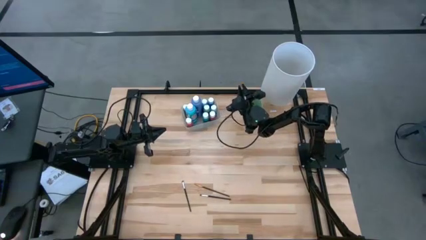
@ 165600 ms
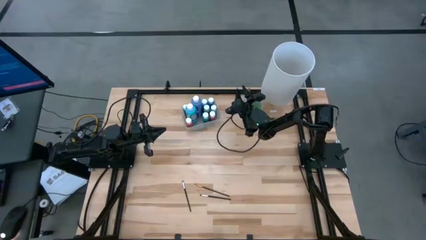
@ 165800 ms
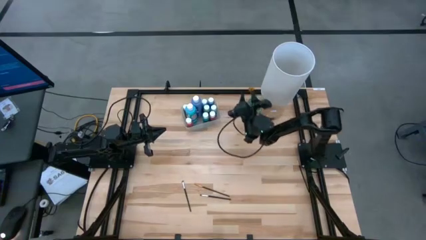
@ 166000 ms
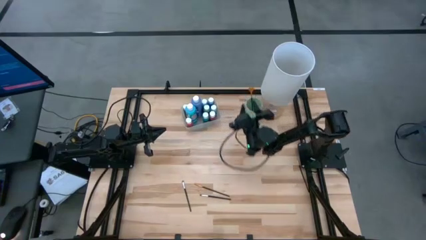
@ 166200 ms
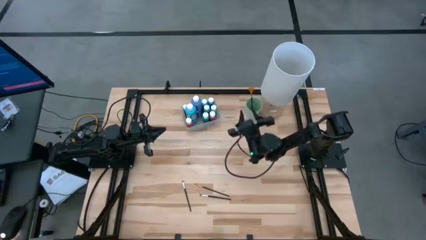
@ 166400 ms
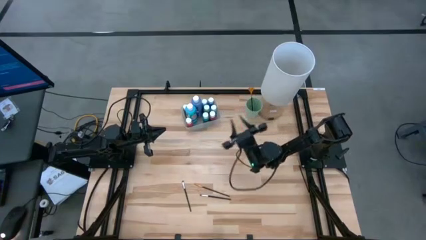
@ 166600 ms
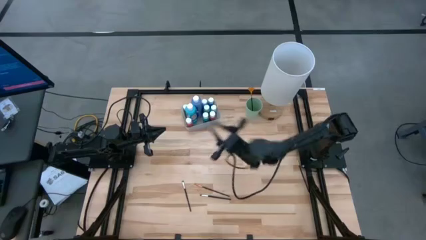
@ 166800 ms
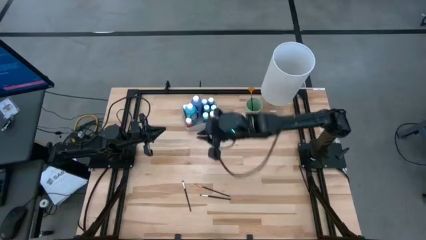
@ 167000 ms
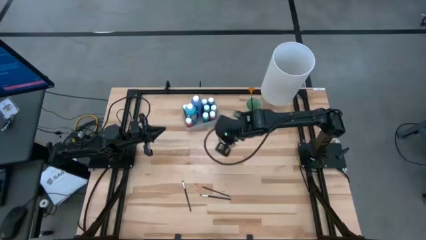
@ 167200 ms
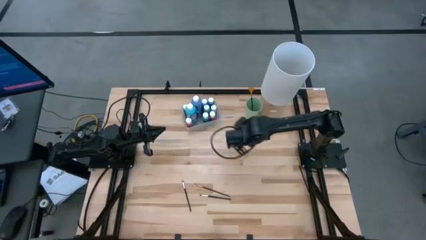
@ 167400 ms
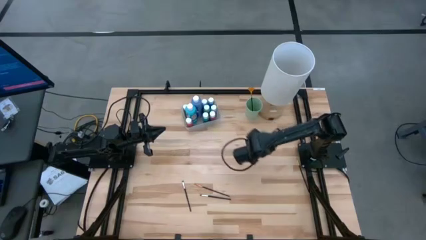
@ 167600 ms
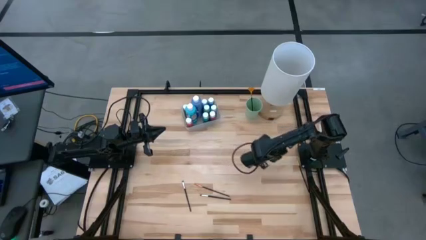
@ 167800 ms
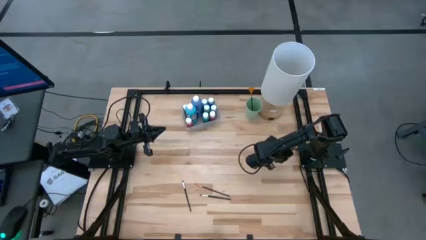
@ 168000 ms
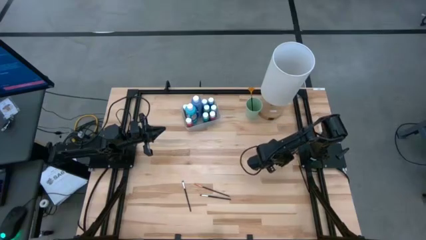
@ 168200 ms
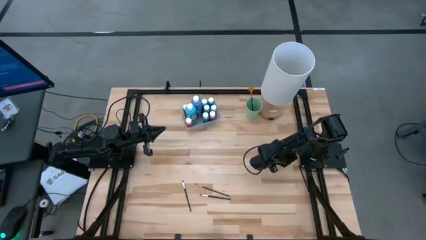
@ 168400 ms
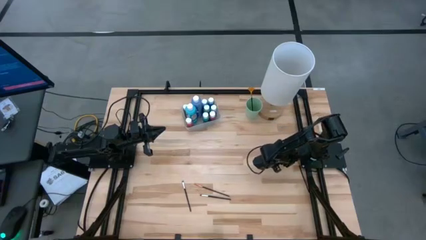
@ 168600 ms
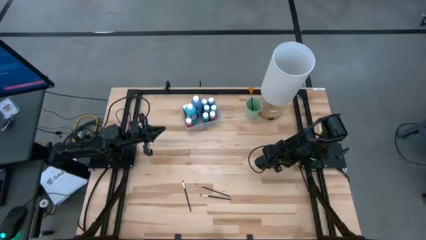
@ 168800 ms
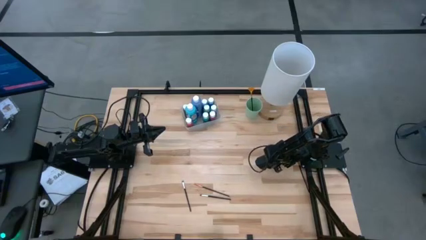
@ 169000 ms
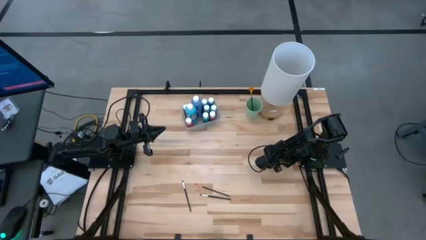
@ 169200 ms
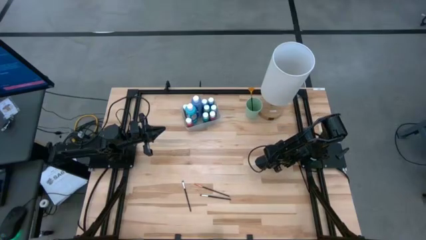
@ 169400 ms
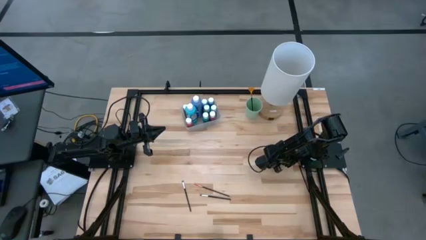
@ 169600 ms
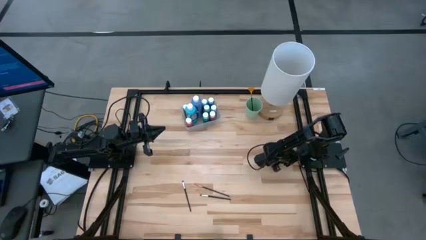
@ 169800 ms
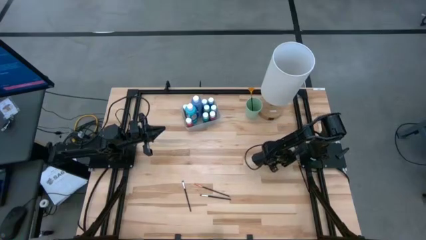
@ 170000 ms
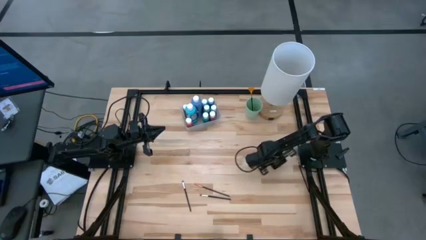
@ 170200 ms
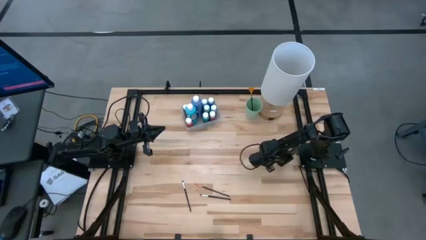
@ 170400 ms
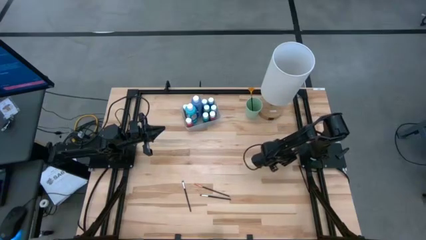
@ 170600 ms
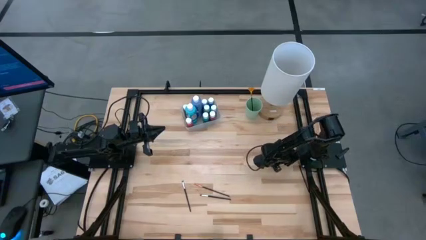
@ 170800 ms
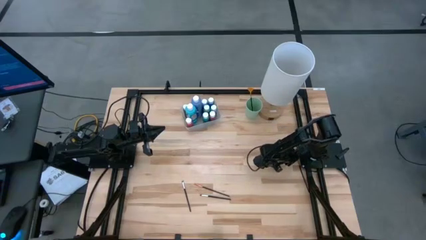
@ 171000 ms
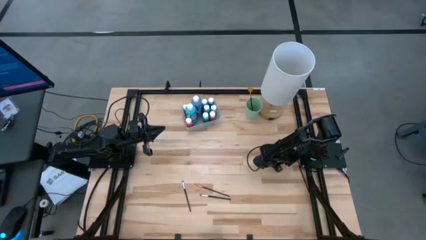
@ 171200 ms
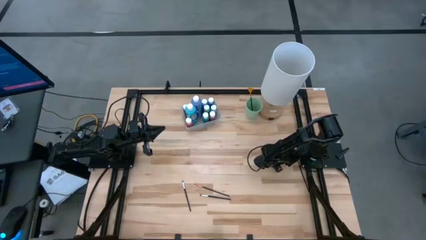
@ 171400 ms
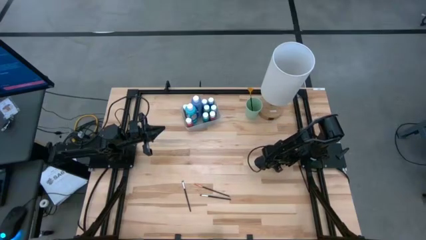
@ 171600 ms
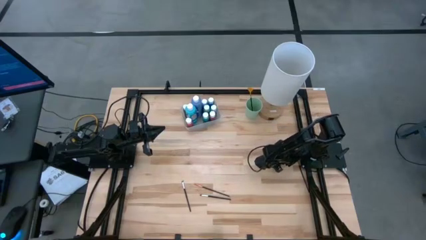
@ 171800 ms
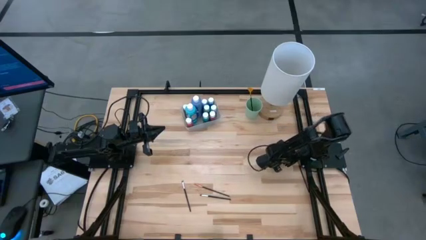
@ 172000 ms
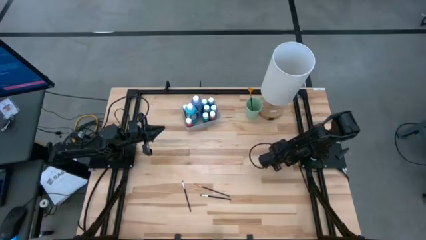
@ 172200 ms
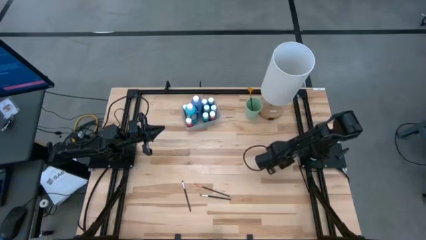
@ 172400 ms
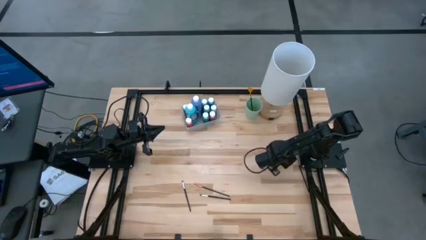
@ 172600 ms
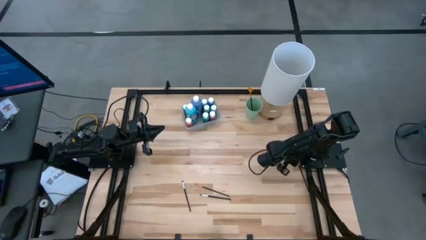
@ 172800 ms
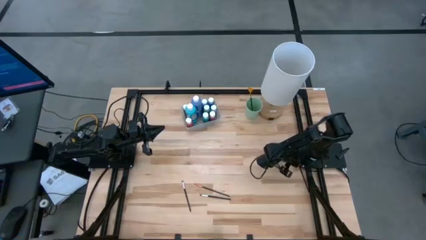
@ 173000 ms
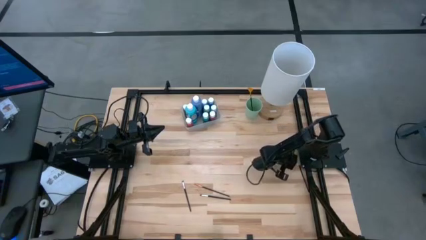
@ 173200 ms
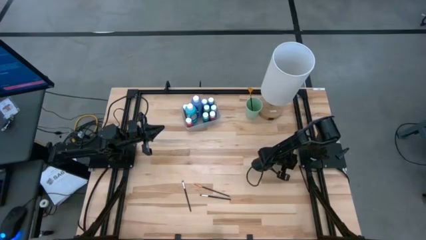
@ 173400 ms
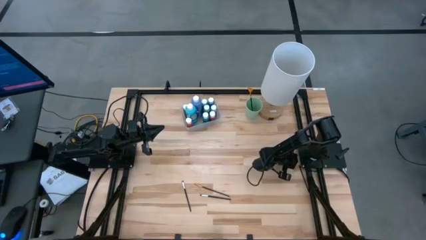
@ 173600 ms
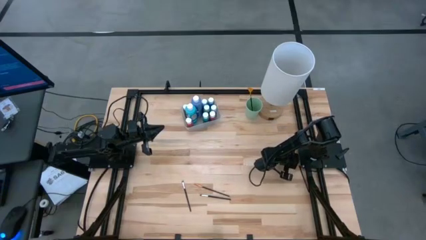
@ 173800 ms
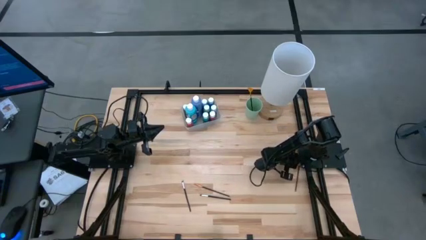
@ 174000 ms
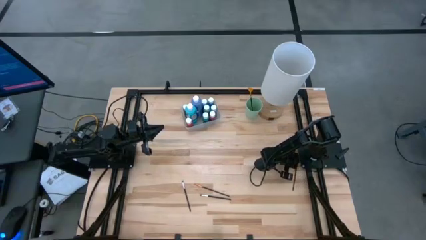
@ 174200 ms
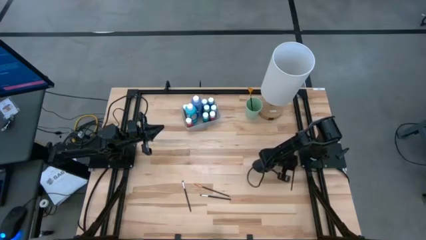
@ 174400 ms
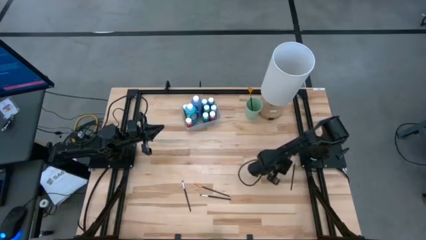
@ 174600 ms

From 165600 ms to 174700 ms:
Task: Pick & Place Paint Supplies
Put the gold paintbrush into the green cup

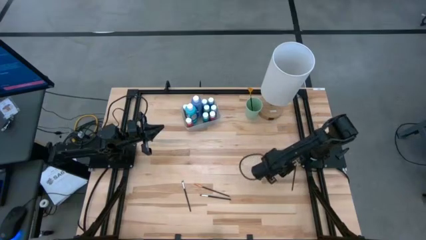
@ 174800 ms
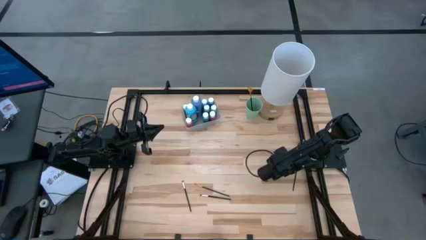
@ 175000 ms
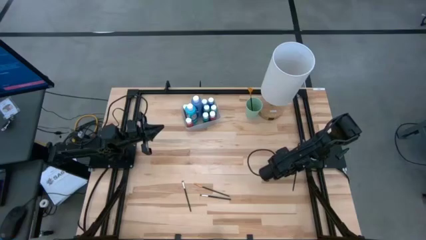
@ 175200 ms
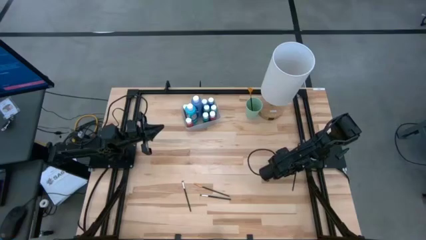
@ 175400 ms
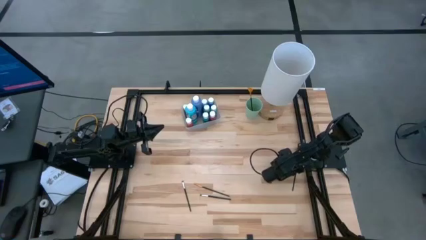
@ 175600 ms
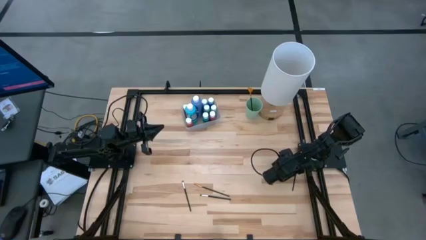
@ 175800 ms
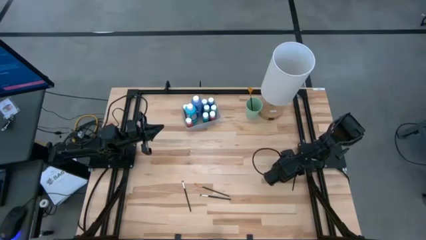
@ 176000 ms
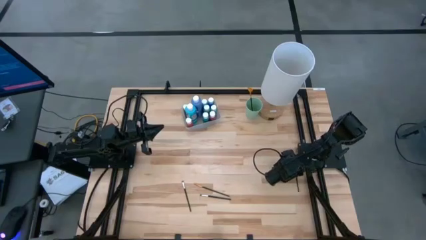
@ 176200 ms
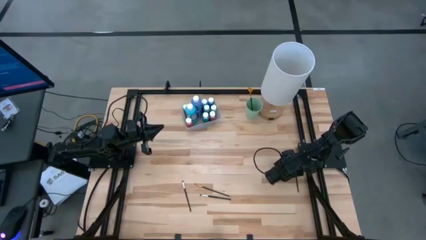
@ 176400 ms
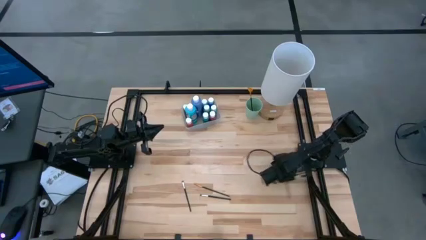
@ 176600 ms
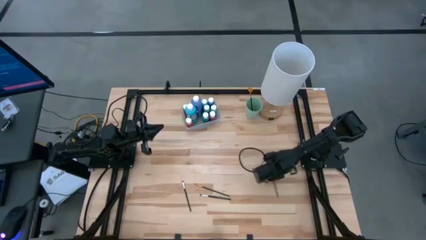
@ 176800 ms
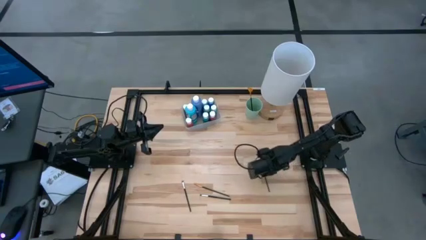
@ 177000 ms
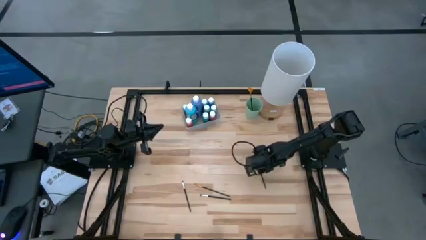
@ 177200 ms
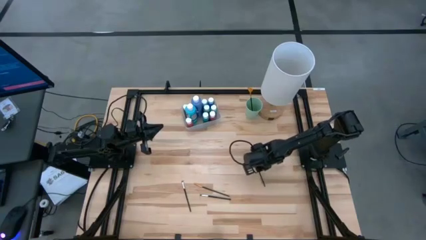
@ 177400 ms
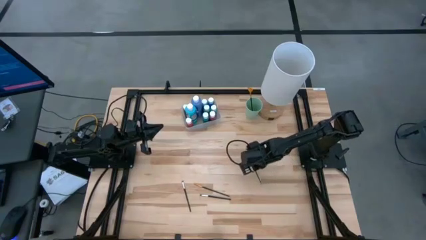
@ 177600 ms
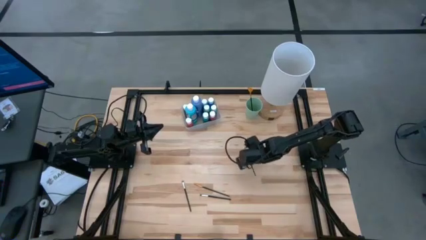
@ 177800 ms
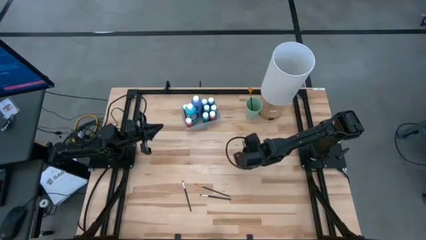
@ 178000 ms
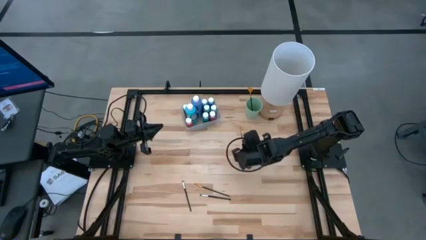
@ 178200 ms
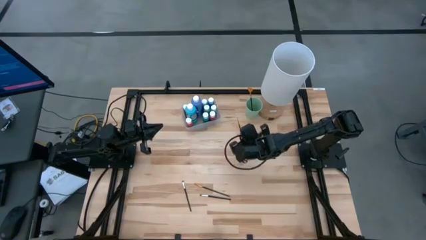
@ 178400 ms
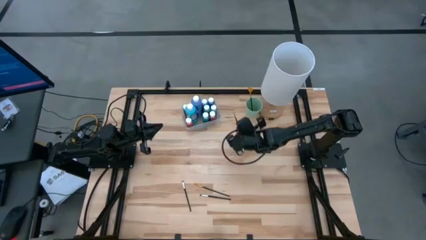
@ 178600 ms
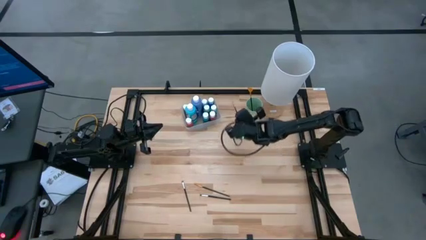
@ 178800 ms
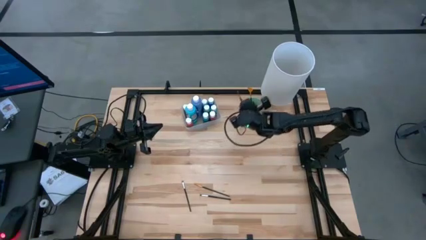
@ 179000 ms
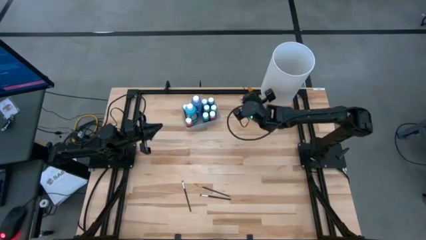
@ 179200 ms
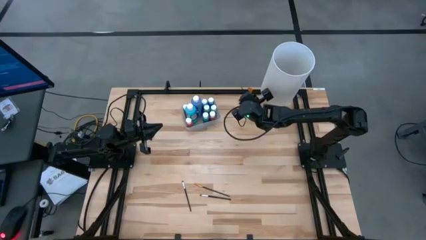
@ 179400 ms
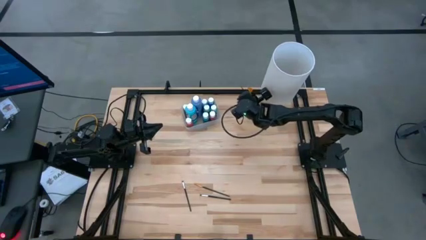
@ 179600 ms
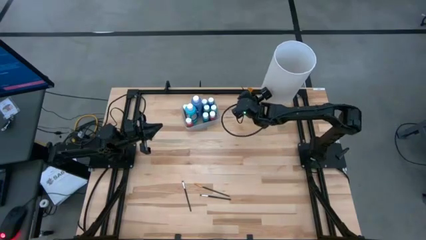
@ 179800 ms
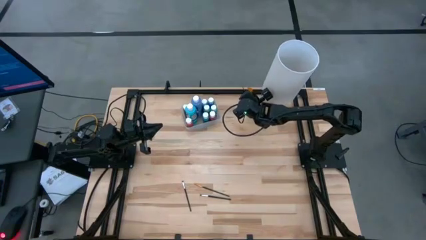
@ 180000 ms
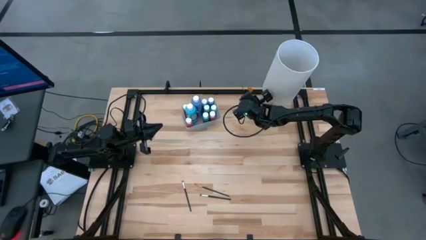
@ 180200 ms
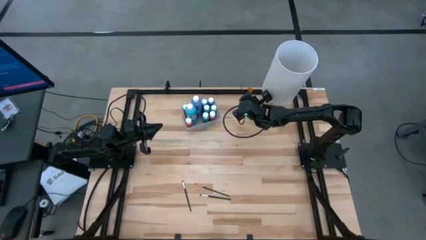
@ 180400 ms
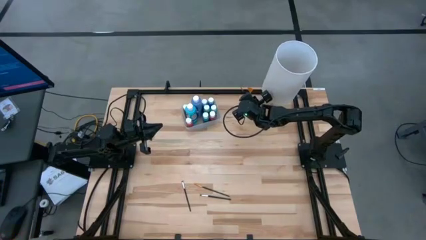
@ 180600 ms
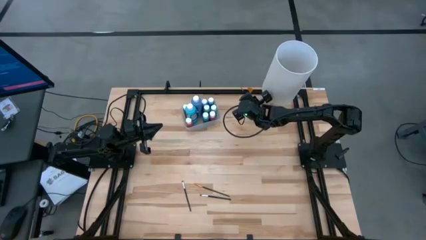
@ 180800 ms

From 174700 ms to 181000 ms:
Put the gold paintbrush into the green cup
